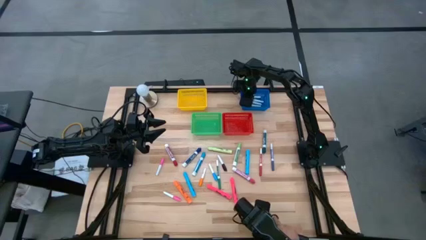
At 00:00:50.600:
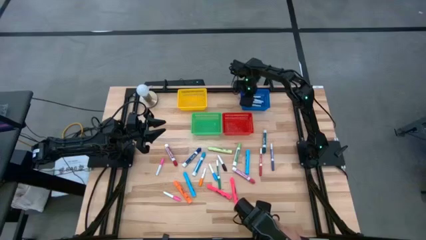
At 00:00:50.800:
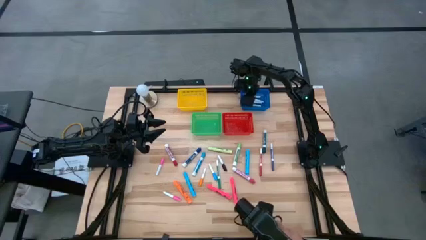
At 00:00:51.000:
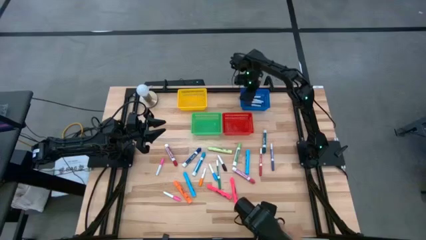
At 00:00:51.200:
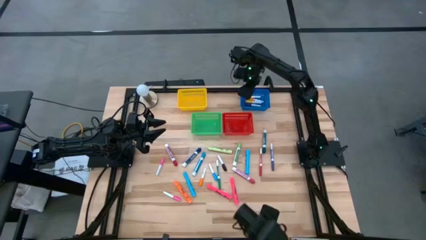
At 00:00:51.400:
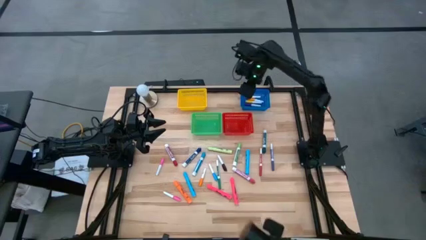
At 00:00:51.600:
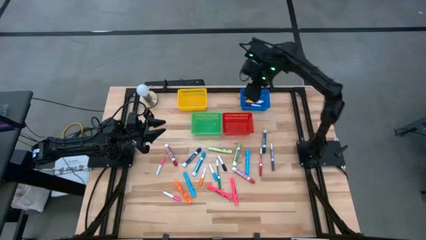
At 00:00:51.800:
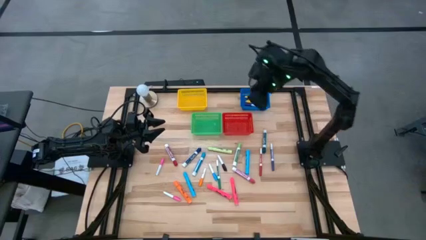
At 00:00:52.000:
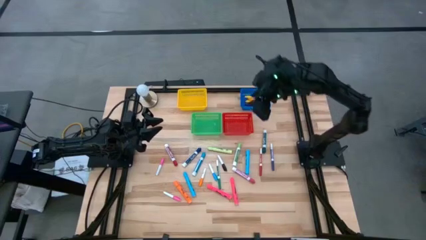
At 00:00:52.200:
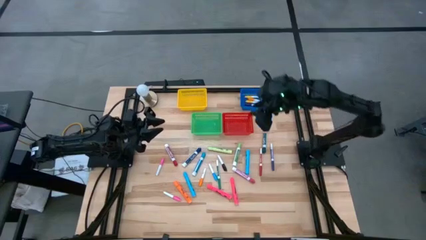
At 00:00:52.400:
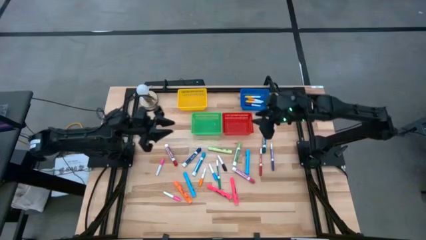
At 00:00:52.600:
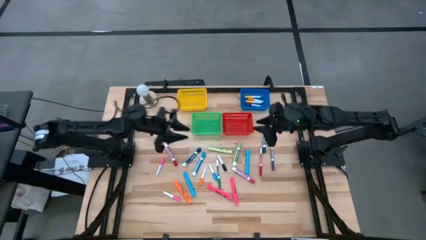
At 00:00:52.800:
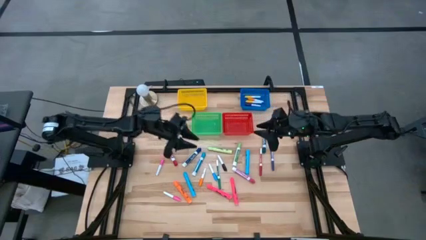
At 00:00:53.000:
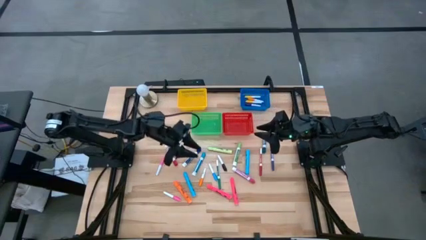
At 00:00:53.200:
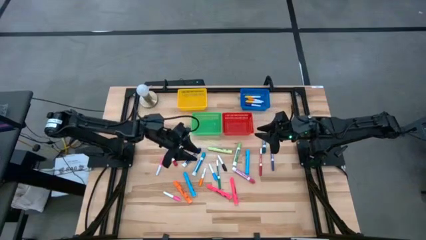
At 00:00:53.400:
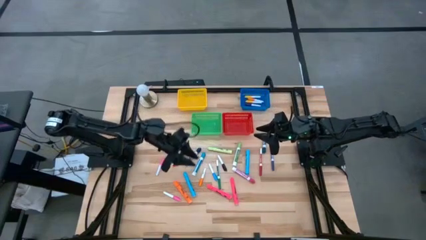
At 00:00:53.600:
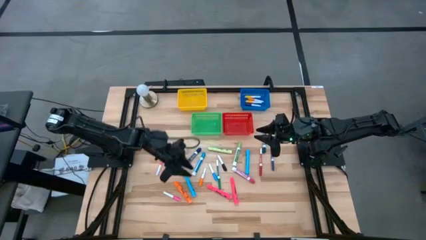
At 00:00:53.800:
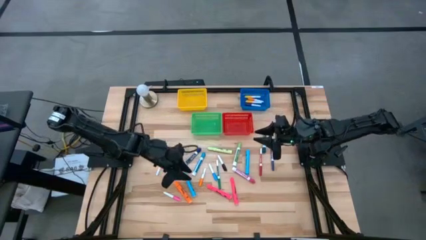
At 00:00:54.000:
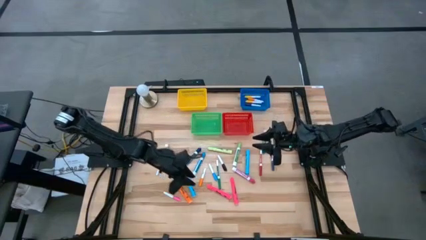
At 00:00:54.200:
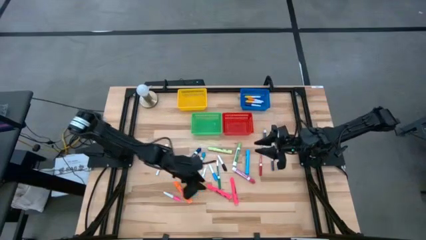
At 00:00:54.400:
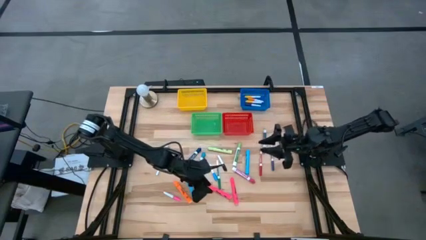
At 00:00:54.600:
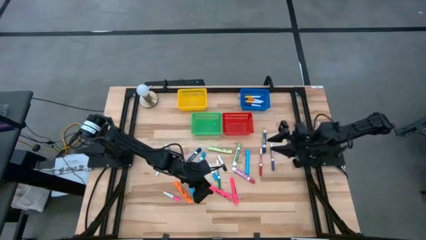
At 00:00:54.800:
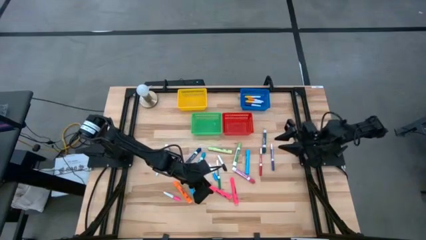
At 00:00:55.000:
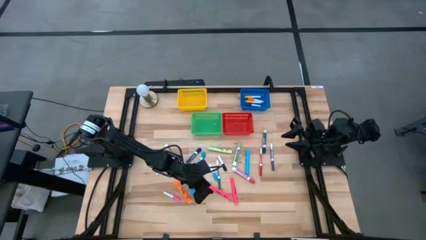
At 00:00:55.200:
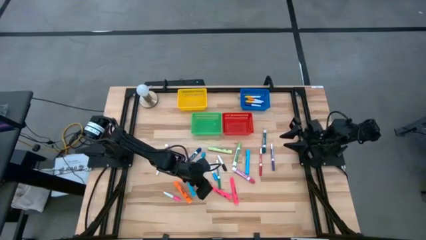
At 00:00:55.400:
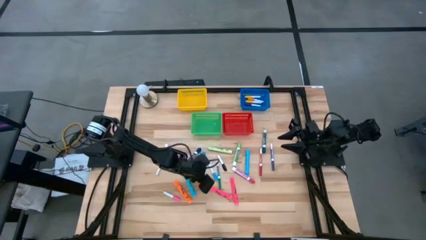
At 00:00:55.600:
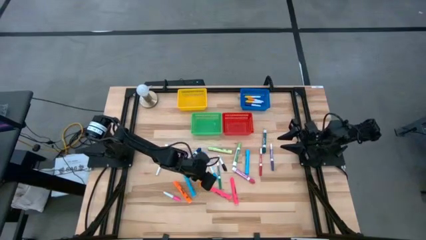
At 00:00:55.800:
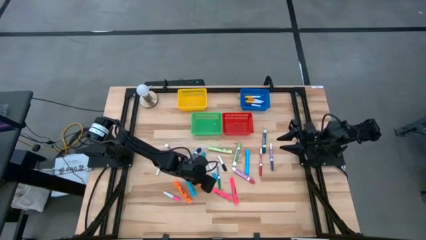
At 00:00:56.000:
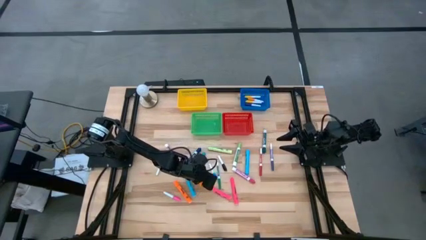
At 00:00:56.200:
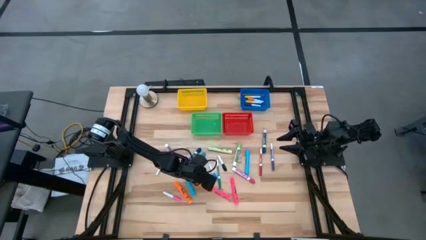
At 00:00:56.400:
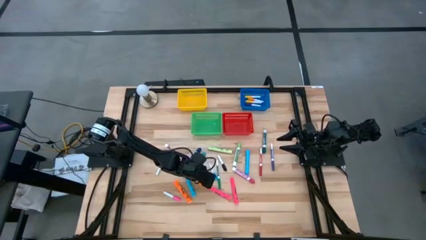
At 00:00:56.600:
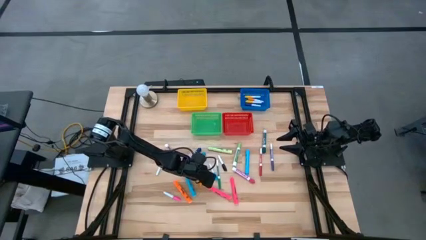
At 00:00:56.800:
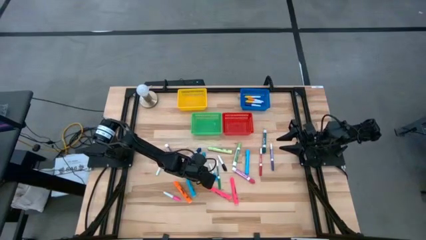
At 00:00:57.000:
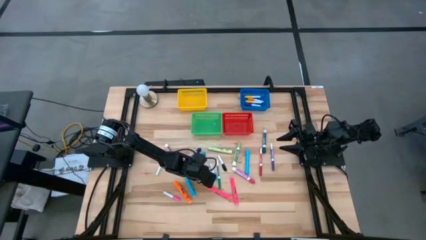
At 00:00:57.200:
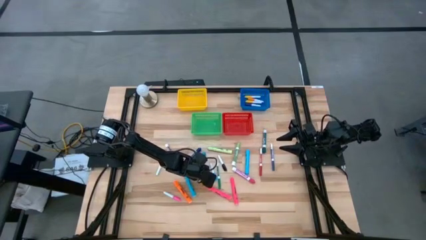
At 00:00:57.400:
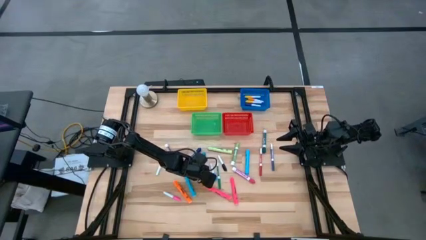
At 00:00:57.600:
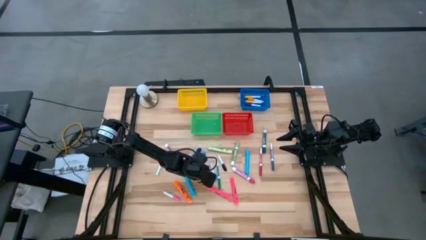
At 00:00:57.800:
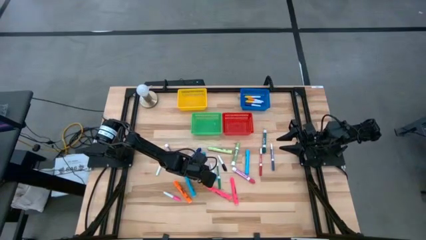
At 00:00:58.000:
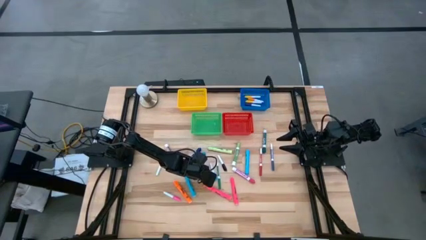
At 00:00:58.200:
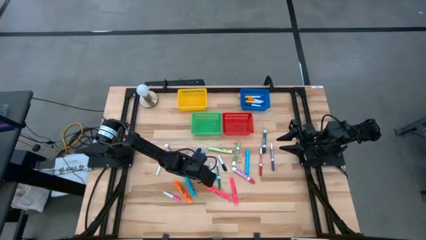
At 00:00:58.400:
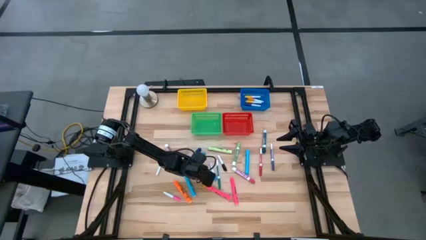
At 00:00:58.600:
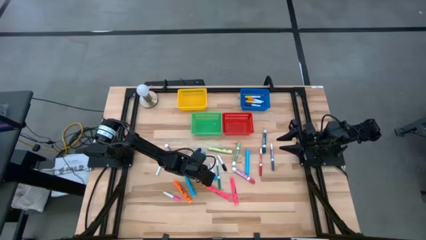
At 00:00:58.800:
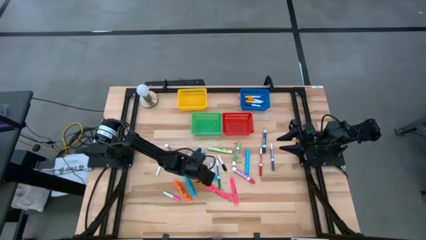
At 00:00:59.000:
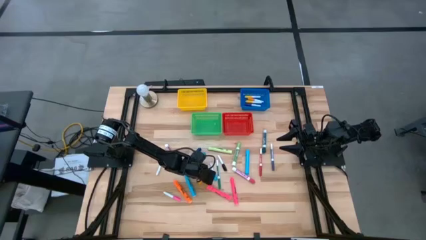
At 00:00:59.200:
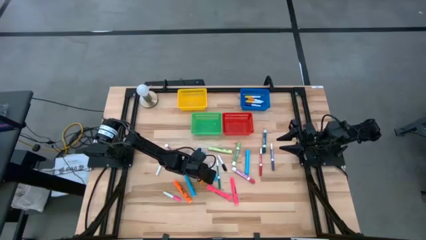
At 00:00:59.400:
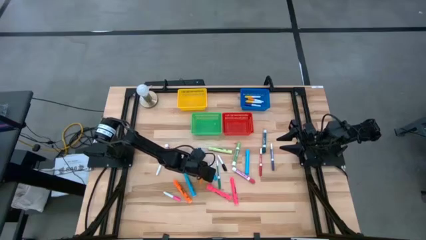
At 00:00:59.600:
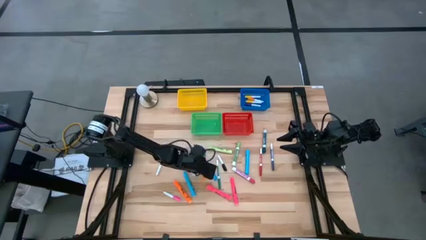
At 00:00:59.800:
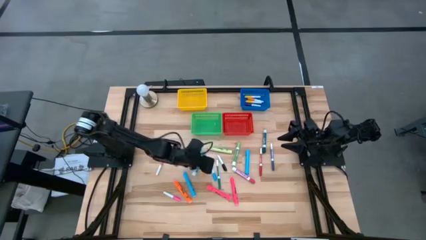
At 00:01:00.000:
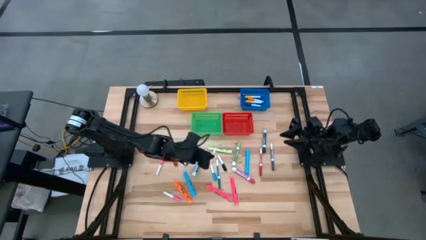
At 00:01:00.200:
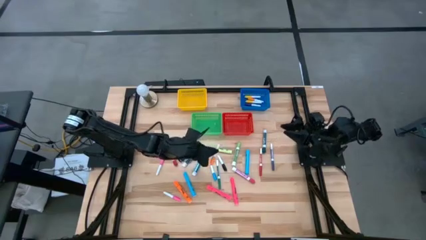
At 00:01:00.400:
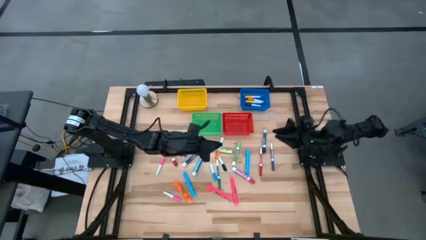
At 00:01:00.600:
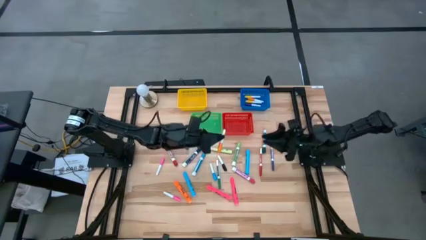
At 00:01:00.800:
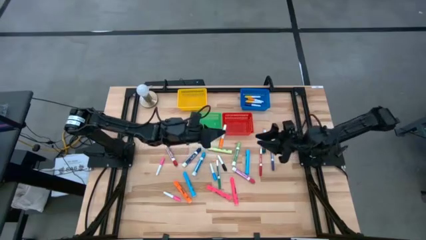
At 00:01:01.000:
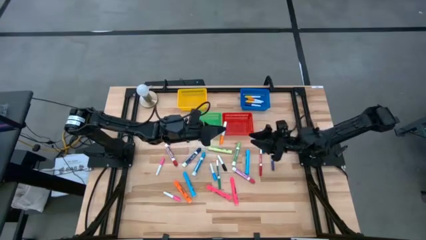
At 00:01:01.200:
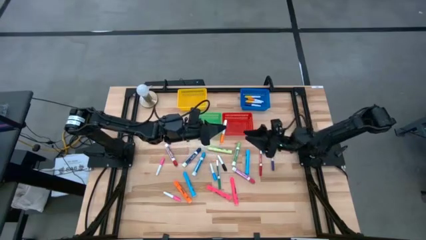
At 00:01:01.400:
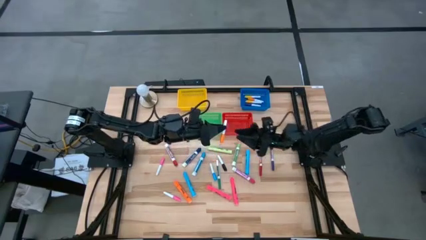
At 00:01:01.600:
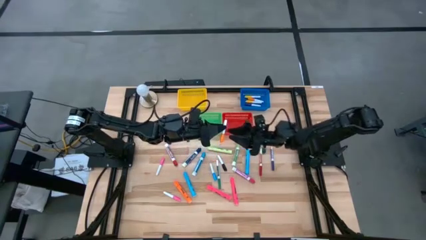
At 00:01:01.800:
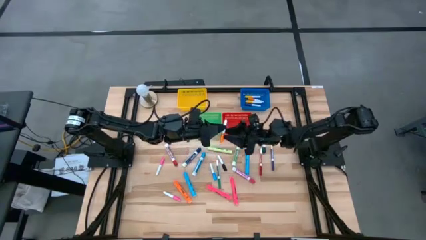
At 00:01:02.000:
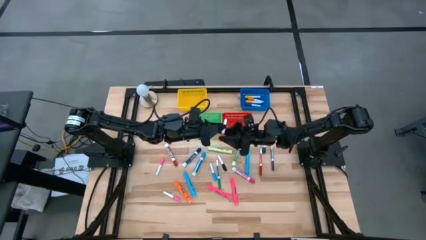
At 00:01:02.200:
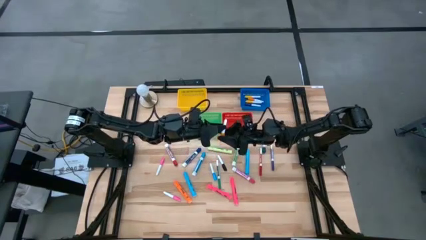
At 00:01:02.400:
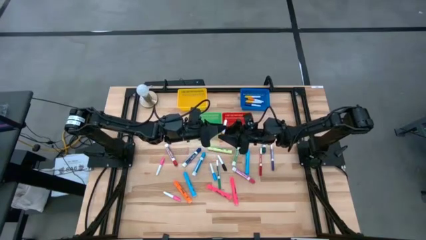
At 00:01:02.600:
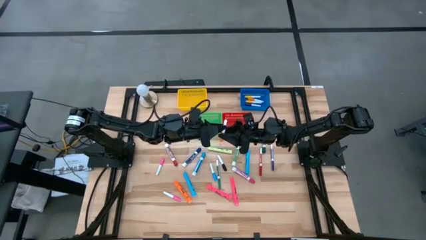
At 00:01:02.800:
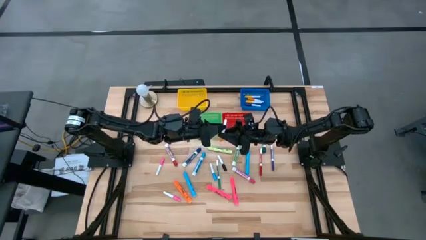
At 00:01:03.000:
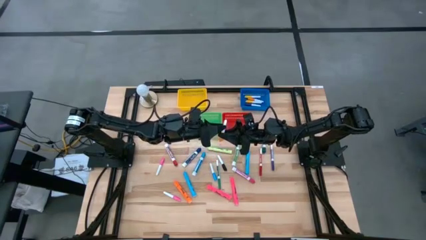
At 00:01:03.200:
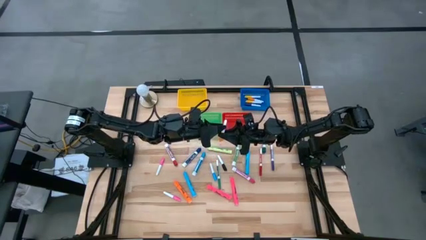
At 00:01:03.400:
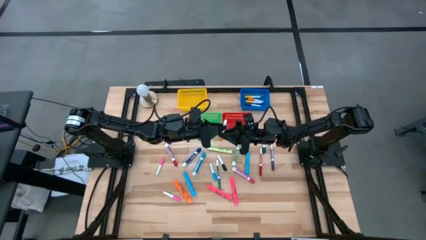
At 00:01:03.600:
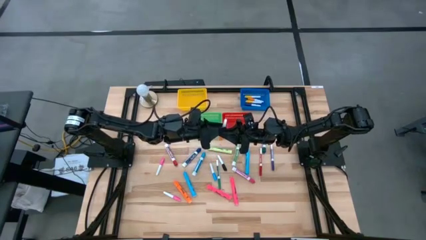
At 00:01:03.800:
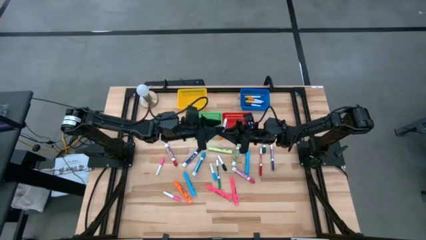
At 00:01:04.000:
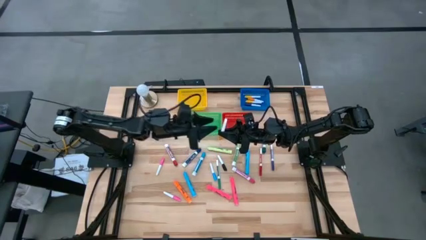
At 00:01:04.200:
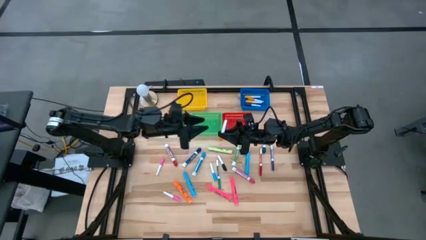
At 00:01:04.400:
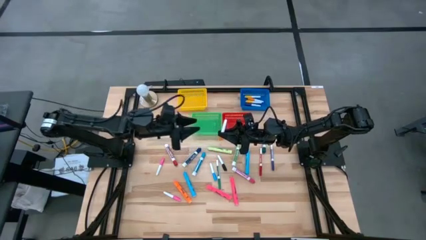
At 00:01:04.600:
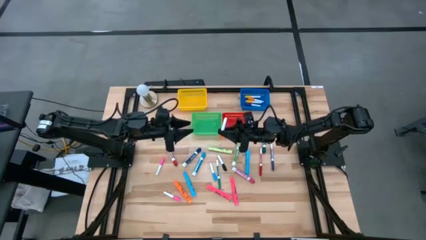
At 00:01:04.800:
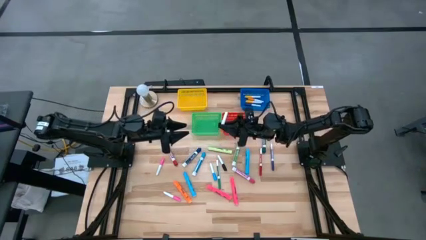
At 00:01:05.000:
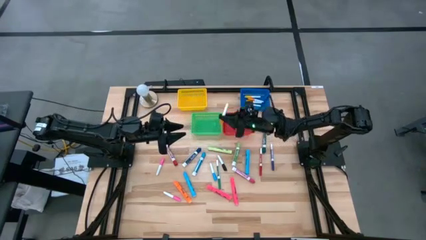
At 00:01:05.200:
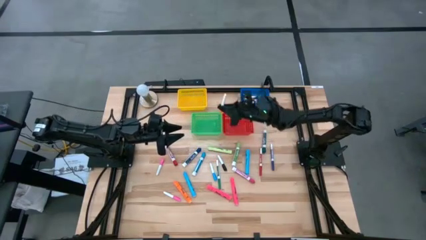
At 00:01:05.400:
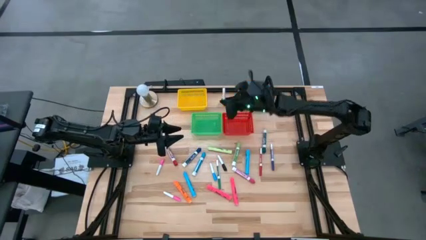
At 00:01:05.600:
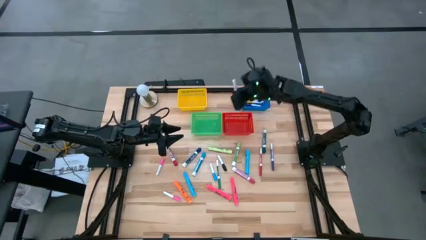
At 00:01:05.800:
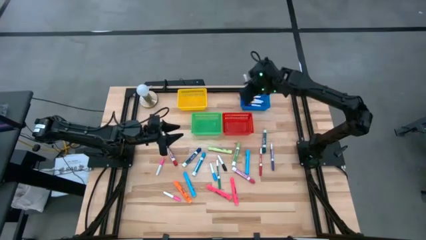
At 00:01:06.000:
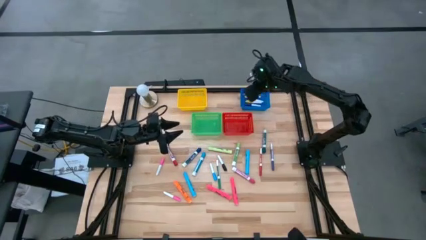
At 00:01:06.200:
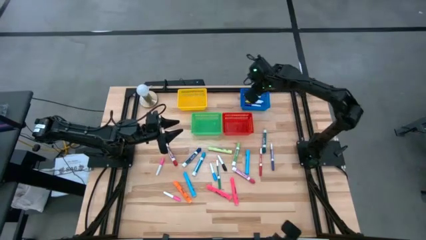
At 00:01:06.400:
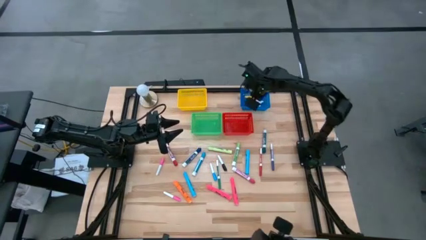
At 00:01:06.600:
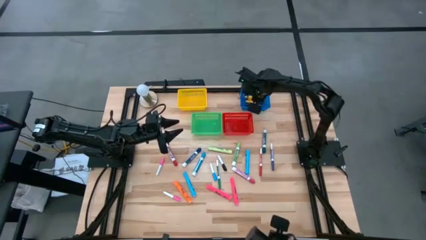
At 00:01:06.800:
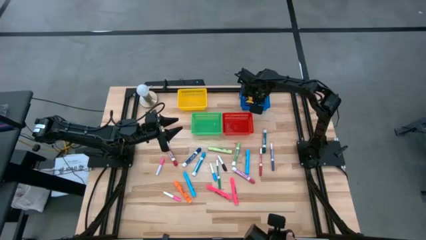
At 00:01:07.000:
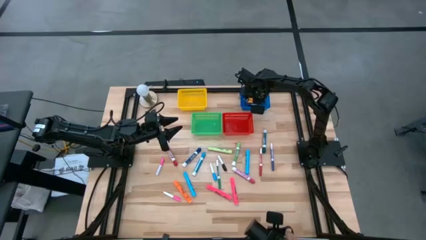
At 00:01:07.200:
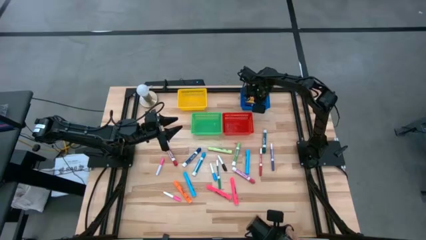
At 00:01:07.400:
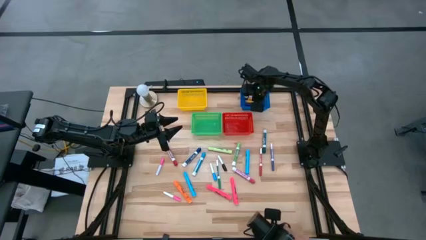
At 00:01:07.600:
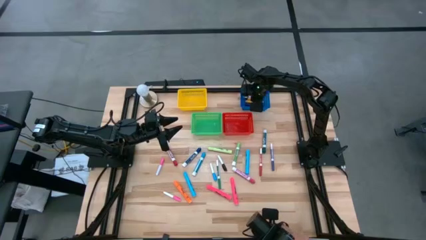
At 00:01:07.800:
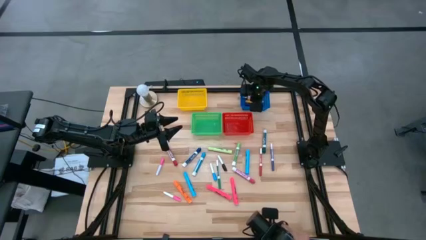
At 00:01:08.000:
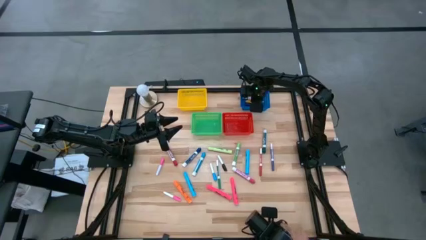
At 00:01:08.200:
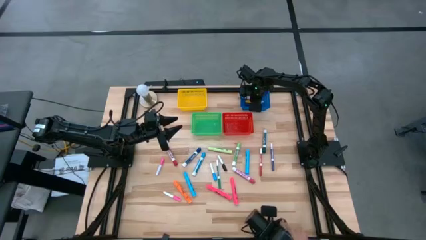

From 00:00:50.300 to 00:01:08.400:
Task: Pick & Place Markers
Put the orange highlighter into the blue bin
